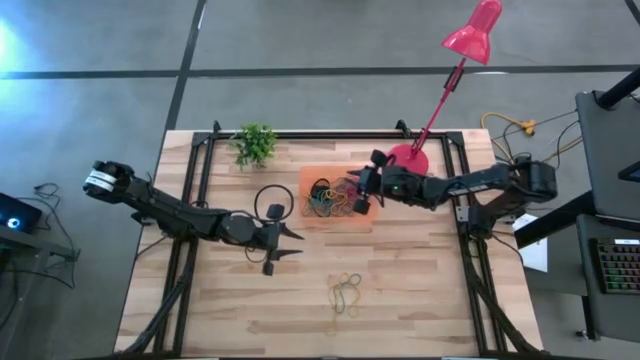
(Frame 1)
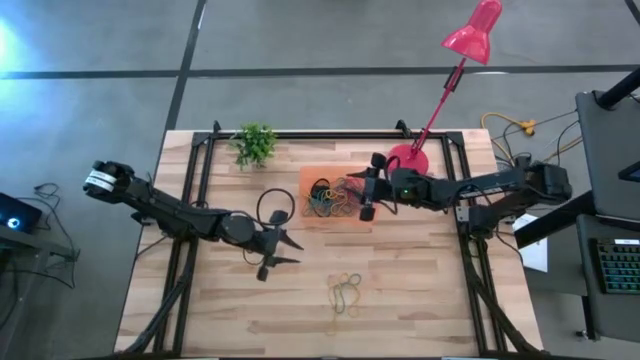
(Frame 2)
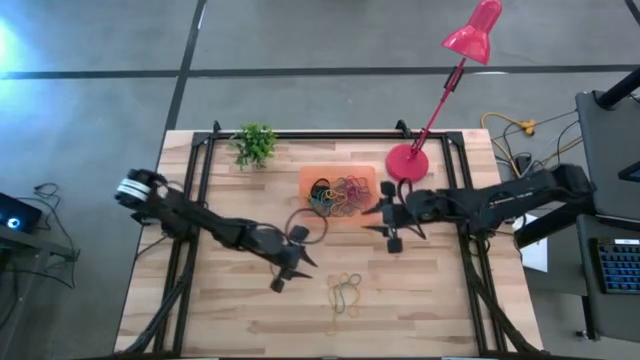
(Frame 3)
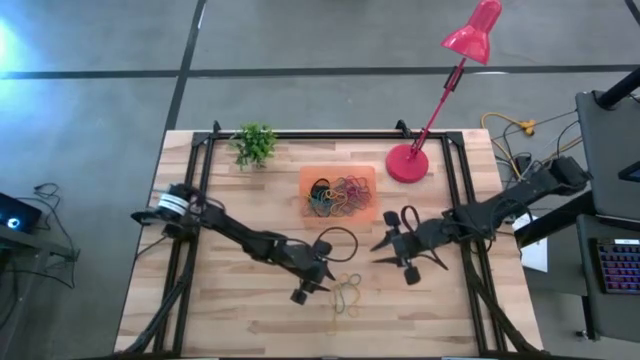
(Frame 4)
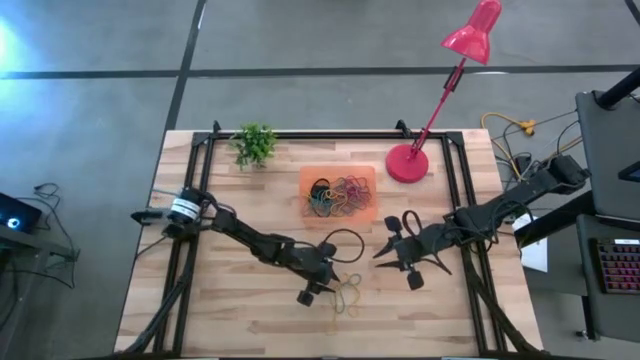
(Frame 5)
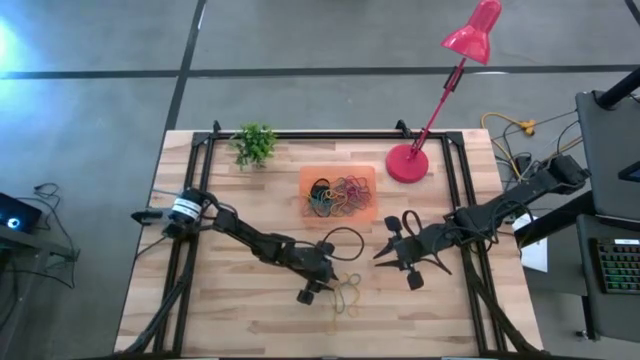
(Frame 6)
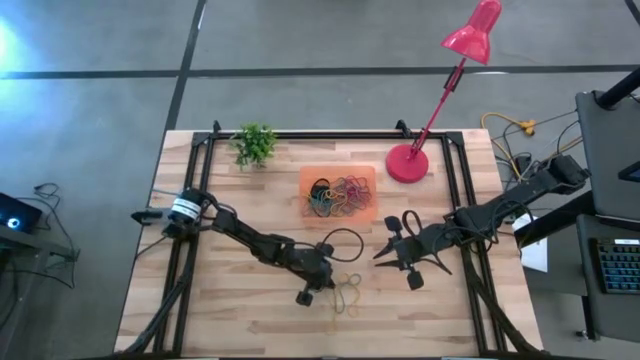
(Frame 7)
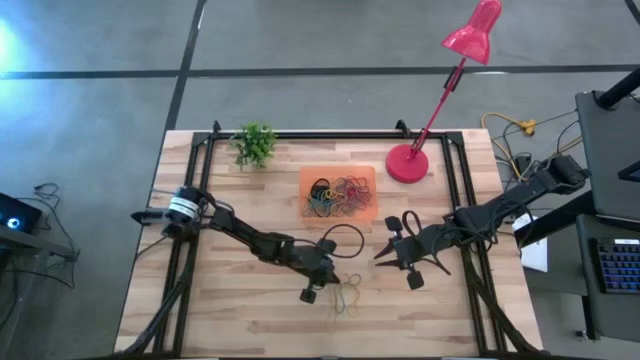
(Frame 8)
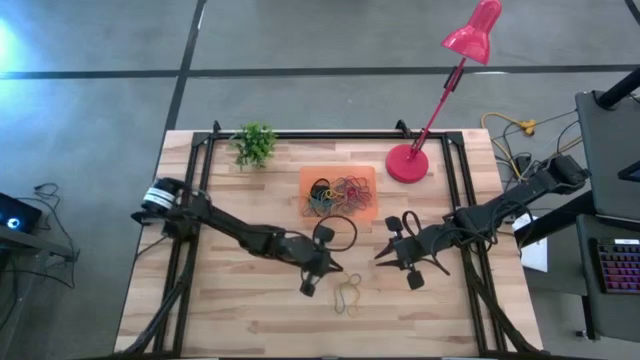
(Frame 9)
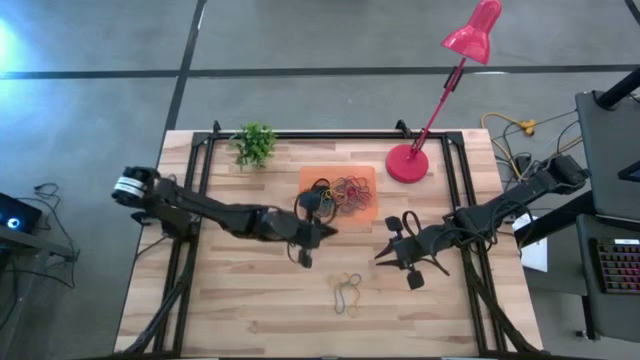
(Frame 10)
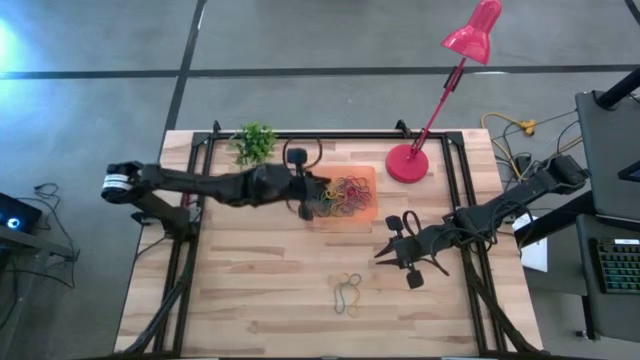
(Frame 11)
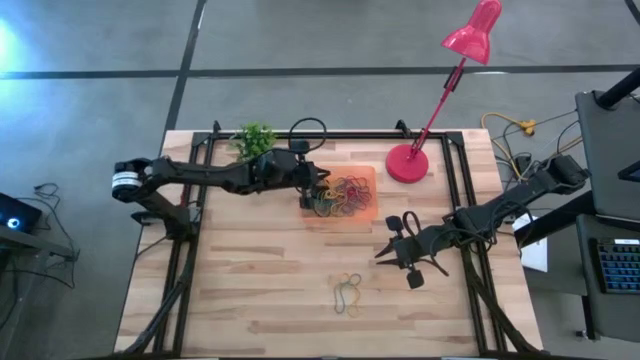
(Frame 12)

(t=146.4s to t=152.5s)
Task: Pick and place rubber bands into bin
Put the left yellow rubber band into the bin

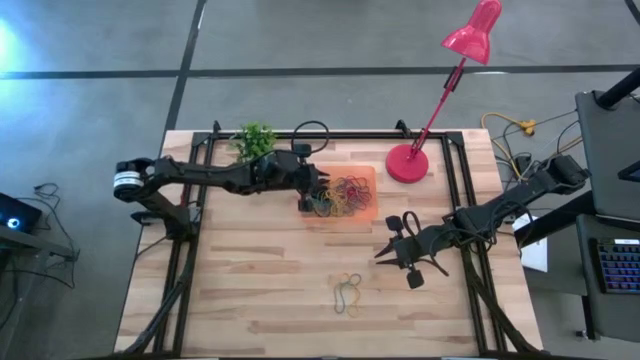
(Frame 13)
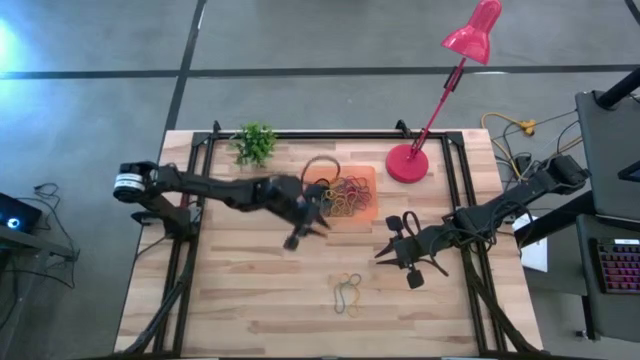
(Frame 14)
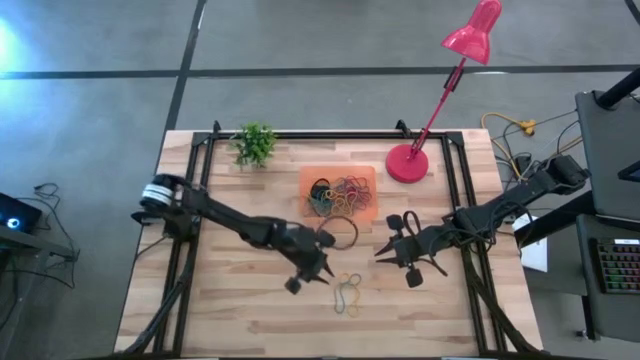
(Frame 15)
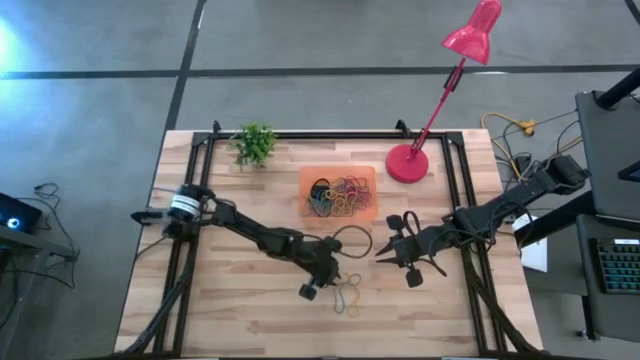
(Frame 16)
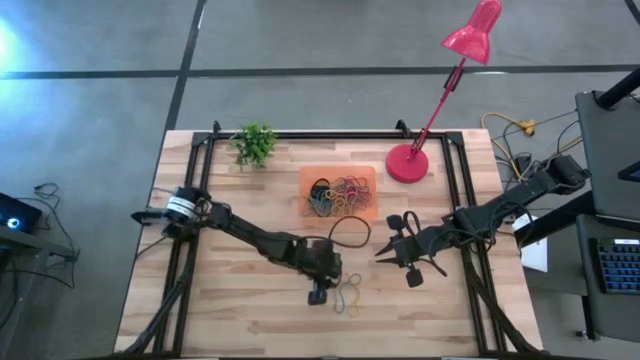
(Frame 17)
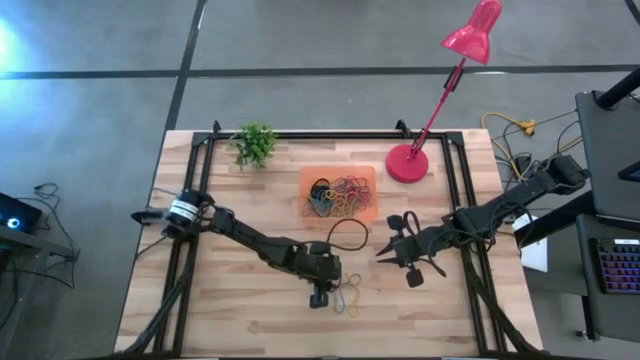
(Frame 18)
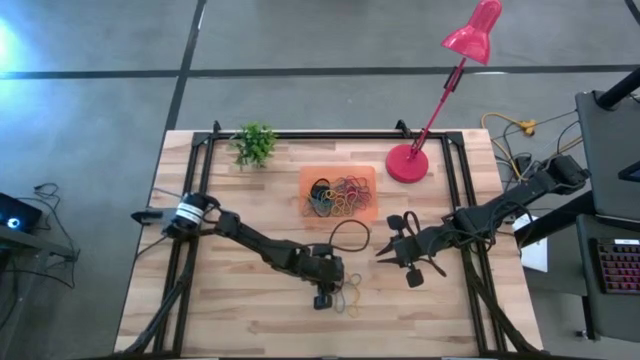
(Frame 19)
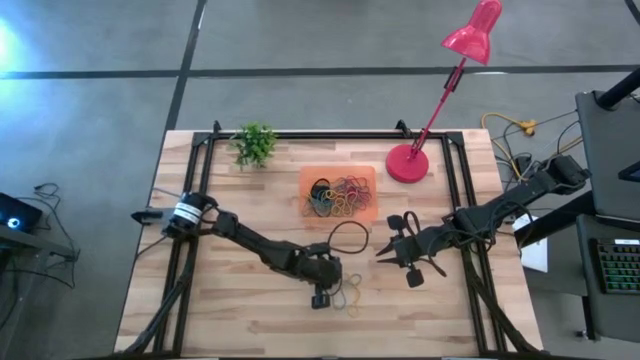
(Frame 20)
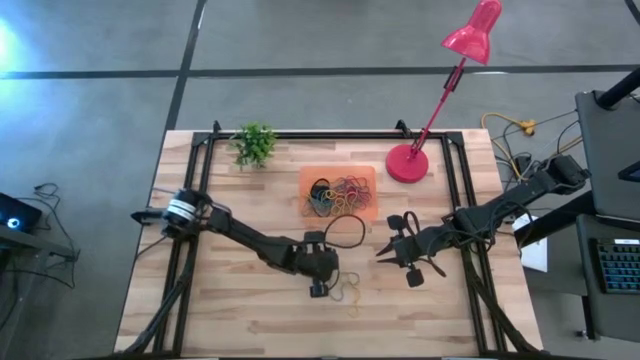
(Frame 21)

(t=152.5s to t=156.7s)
Put the blue rubber band into the bin

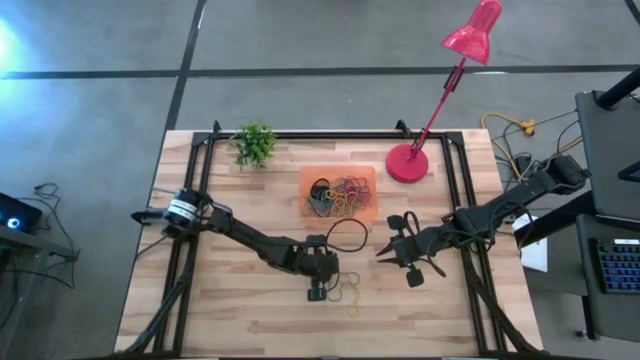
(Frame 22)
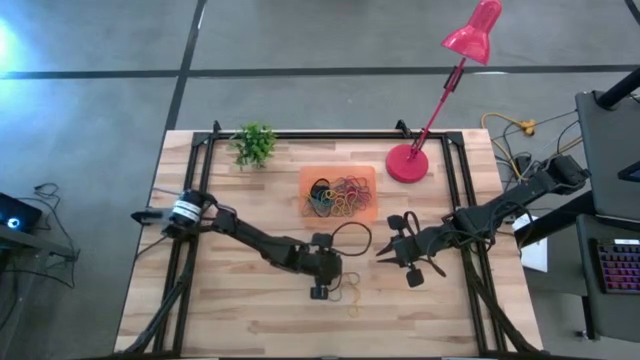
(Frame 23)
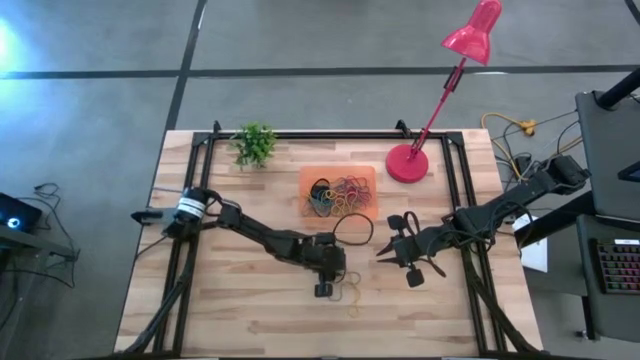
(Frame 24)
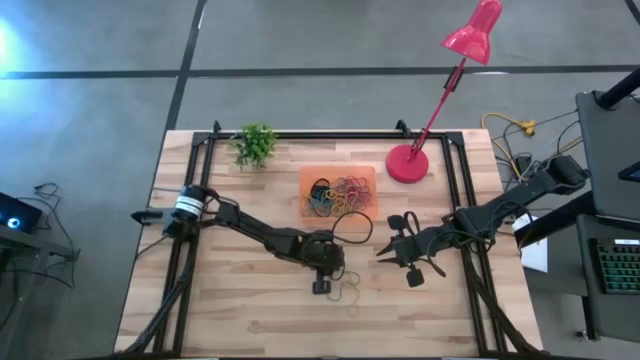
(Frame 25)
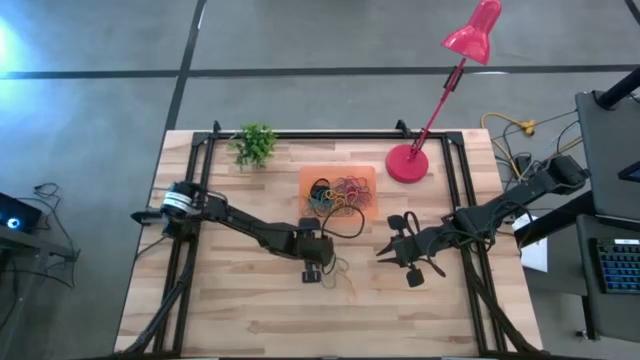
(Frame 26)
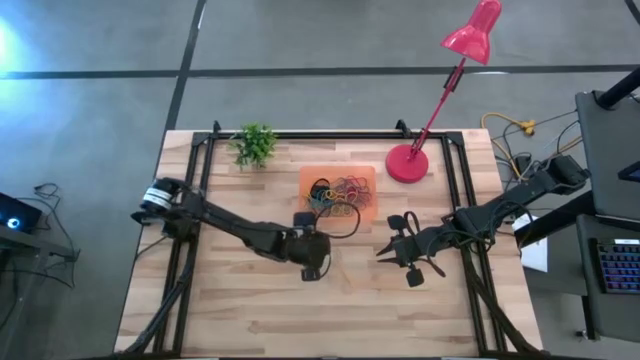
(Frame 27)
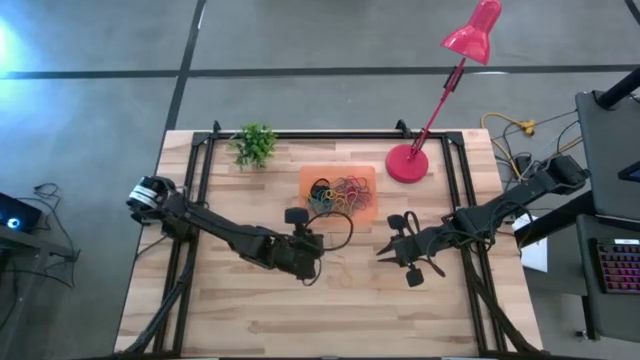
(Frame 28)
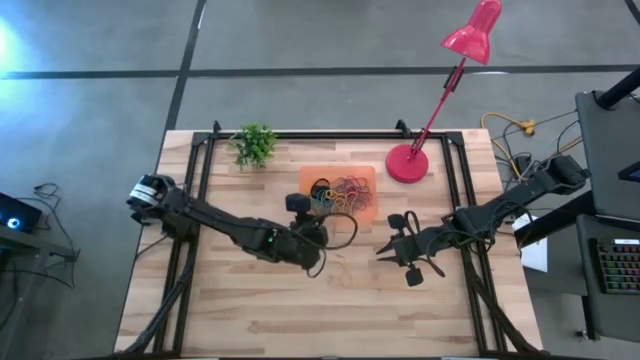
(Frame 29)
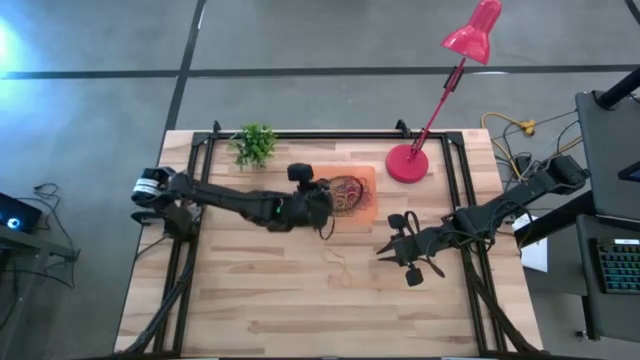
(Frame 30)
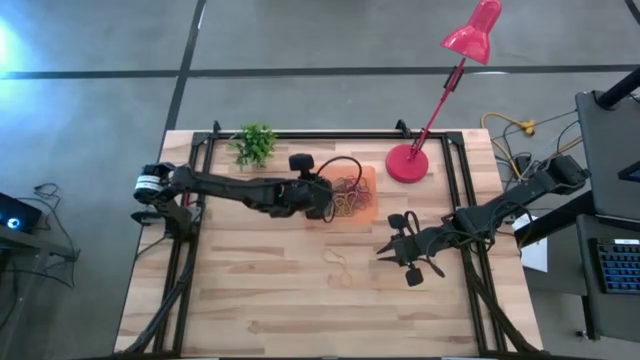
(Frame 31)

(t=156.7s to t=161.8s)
Put the blue rubber band into the bin

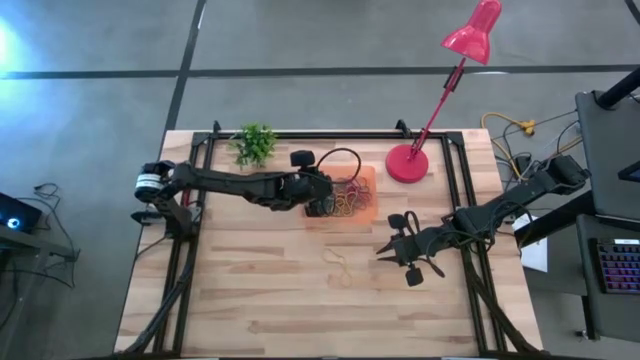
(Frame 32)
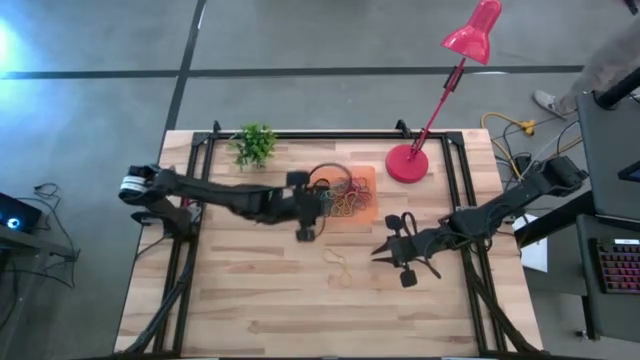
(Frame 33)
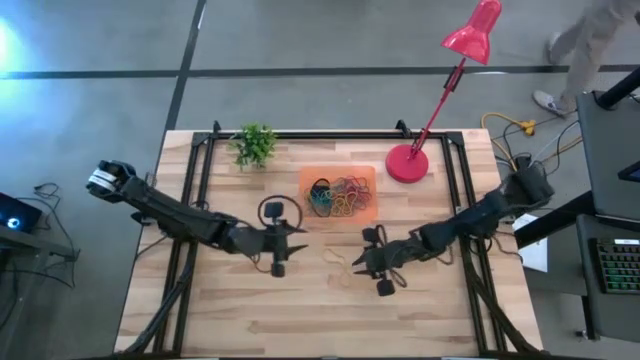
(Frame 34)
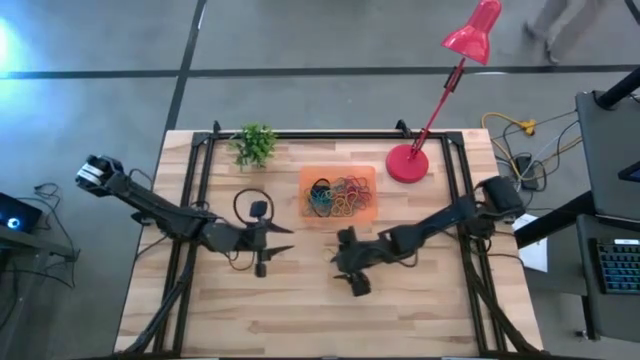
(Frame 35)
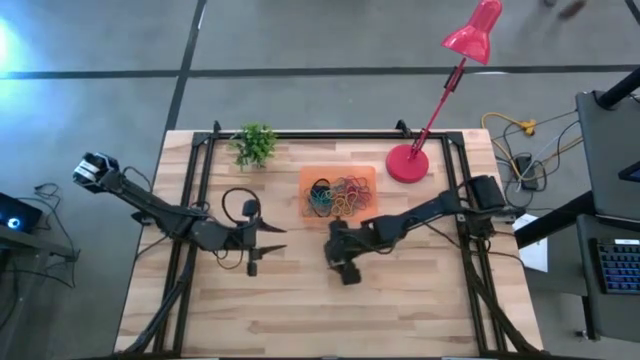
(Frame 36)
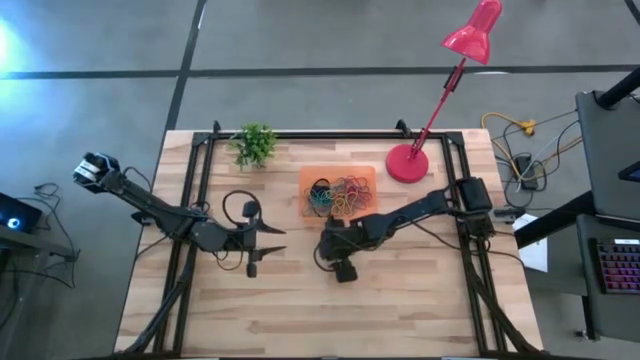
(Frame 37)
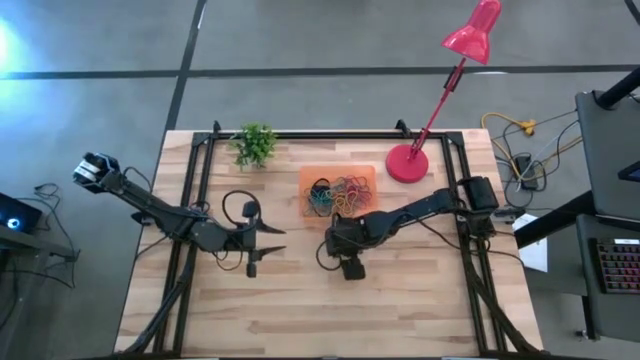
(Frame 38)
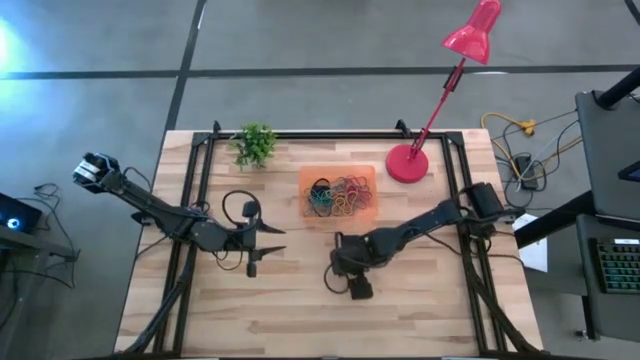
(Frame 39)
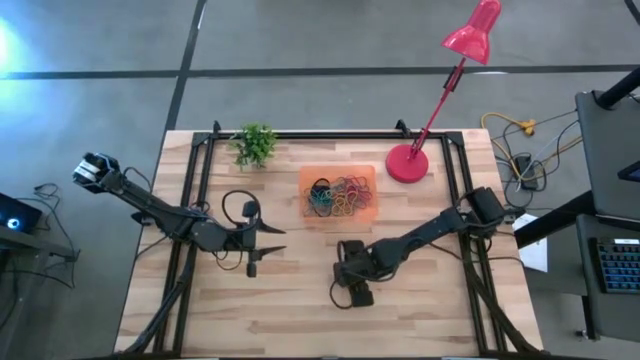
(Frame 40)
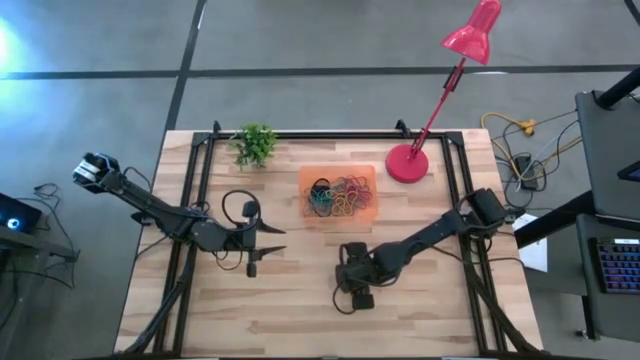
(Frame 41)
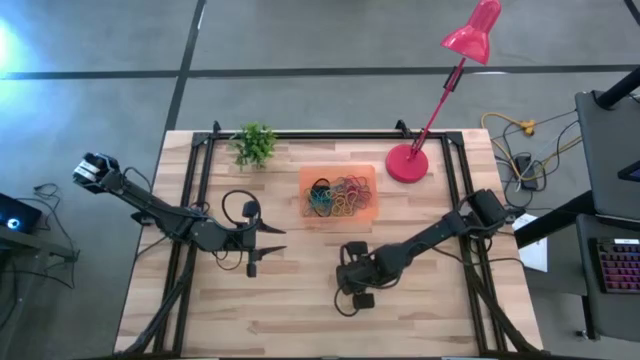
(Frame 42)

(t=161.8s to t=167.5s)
Put the yellow rubber band into the bin
